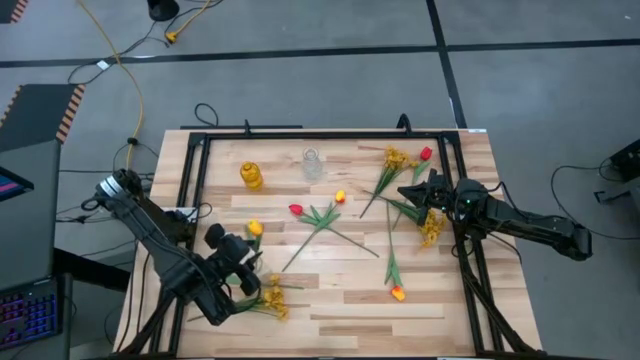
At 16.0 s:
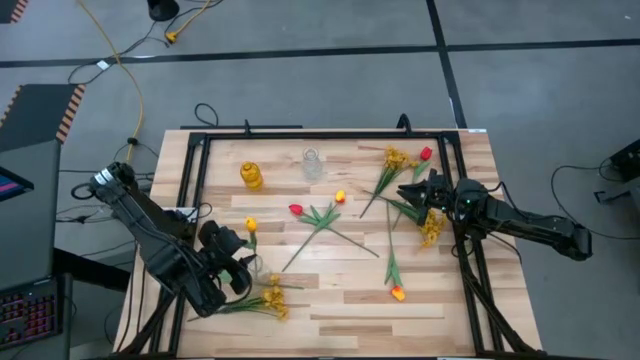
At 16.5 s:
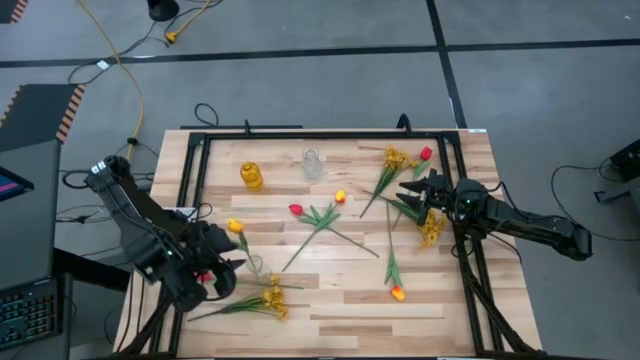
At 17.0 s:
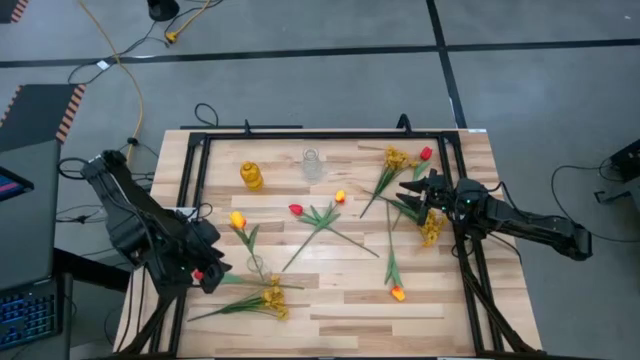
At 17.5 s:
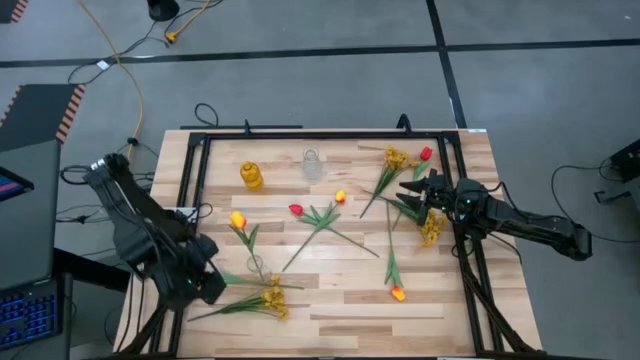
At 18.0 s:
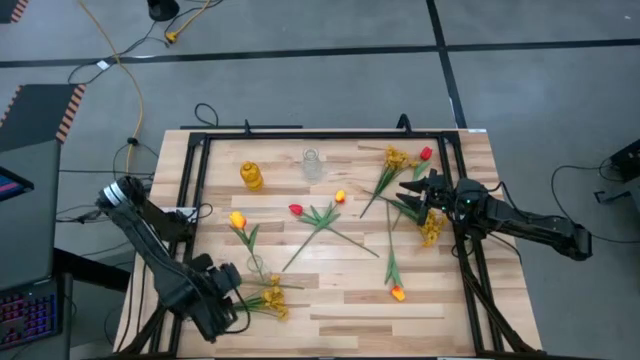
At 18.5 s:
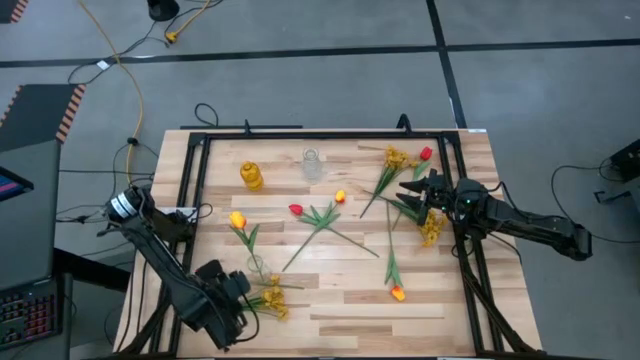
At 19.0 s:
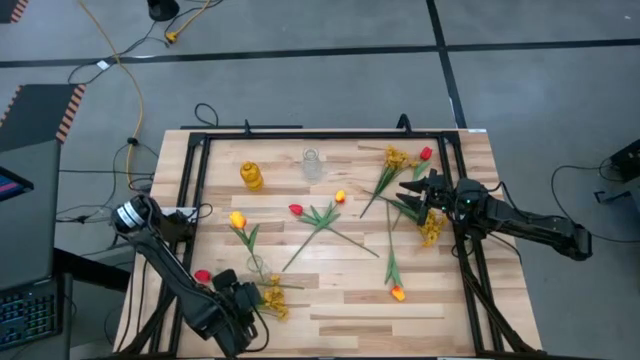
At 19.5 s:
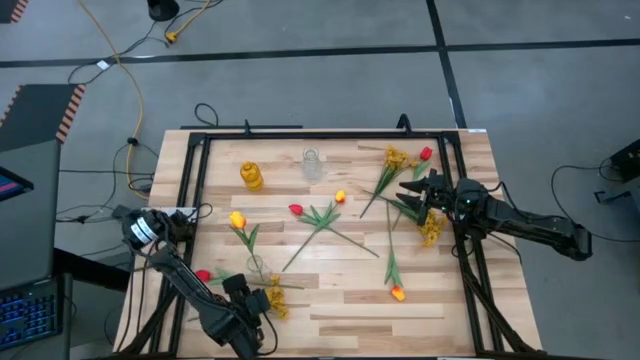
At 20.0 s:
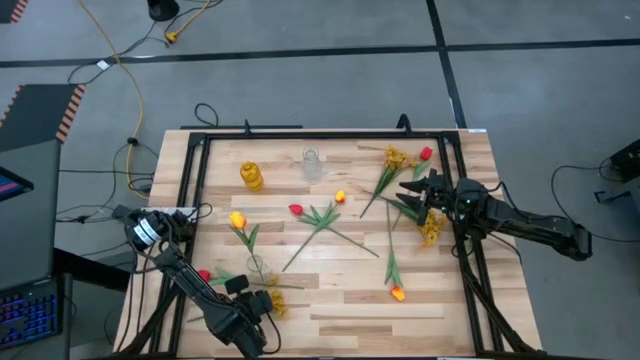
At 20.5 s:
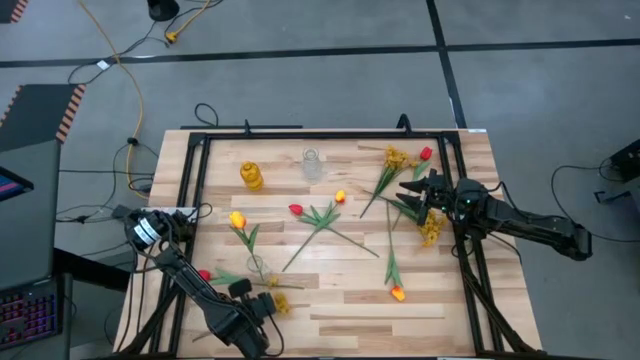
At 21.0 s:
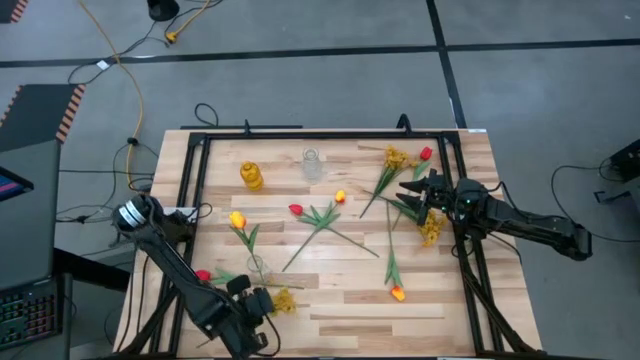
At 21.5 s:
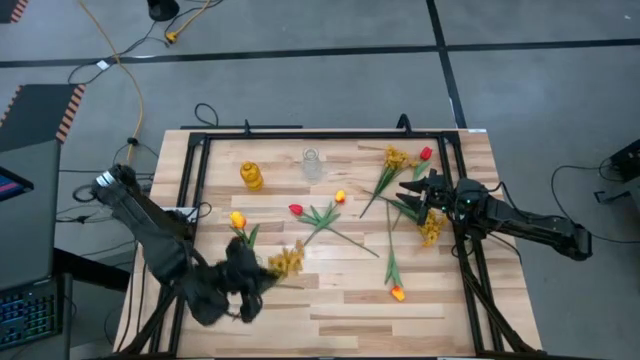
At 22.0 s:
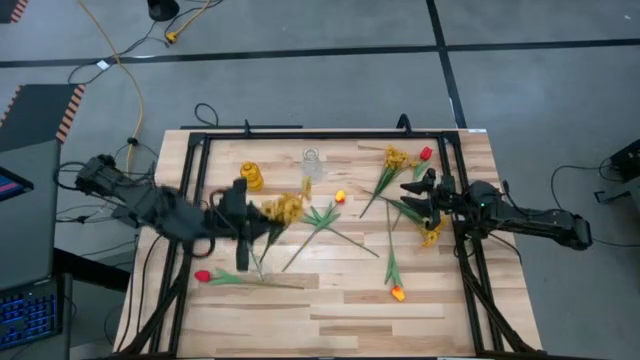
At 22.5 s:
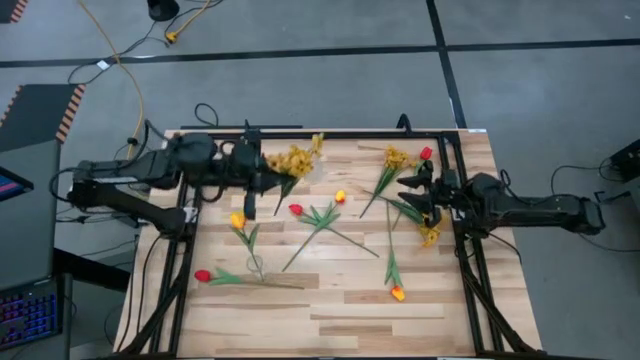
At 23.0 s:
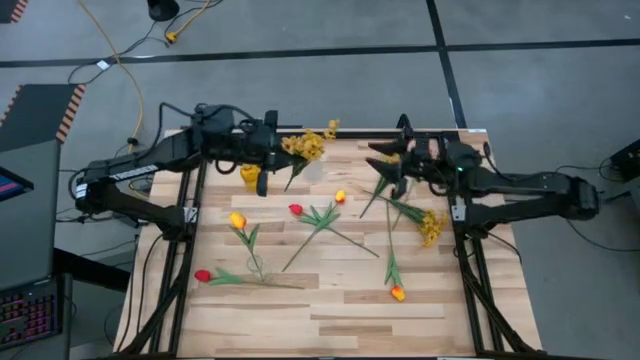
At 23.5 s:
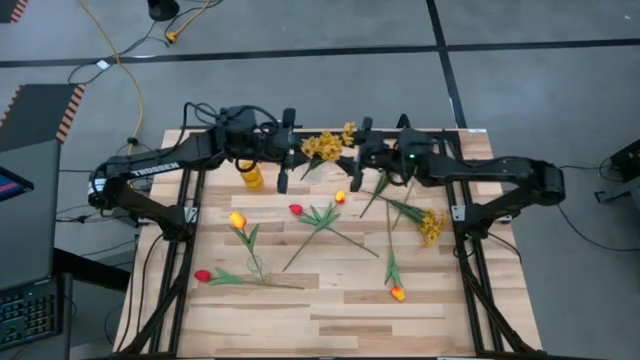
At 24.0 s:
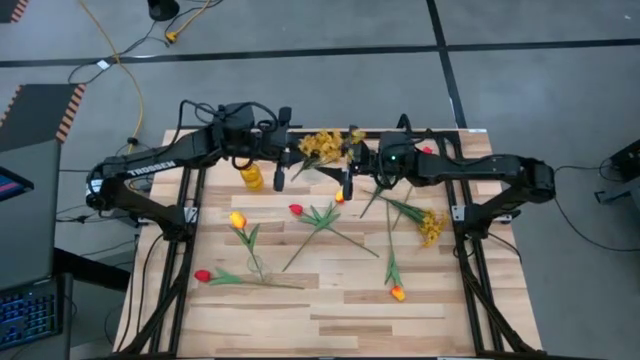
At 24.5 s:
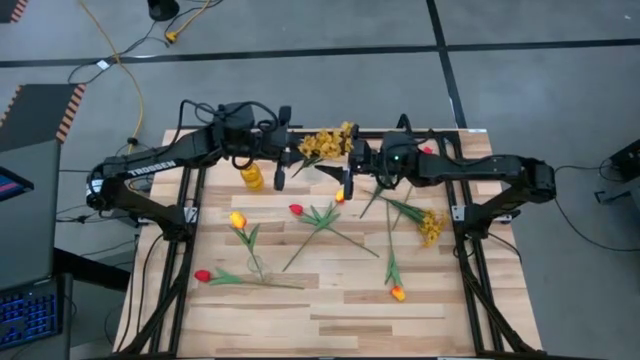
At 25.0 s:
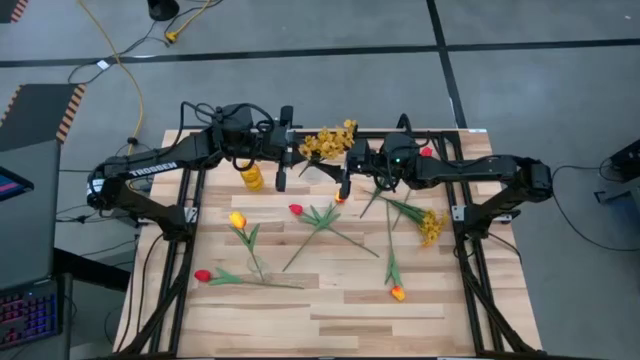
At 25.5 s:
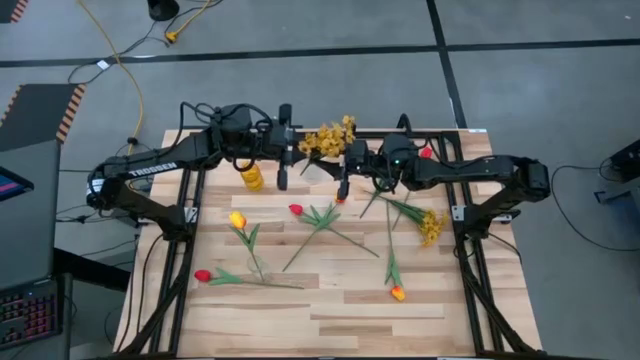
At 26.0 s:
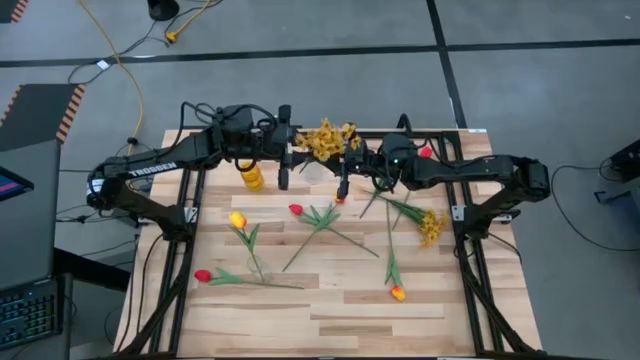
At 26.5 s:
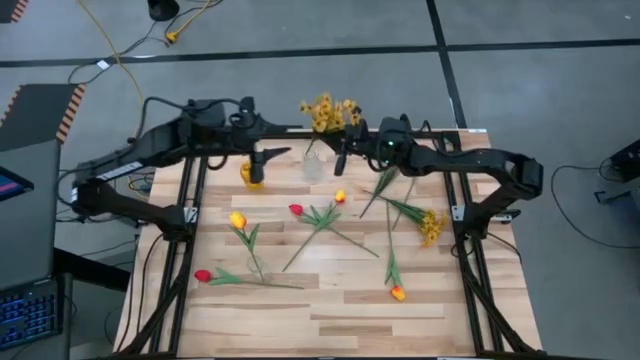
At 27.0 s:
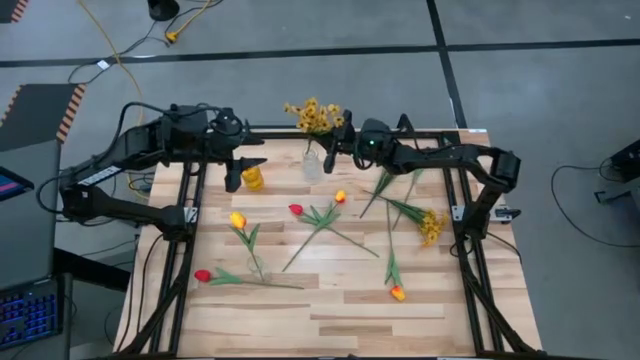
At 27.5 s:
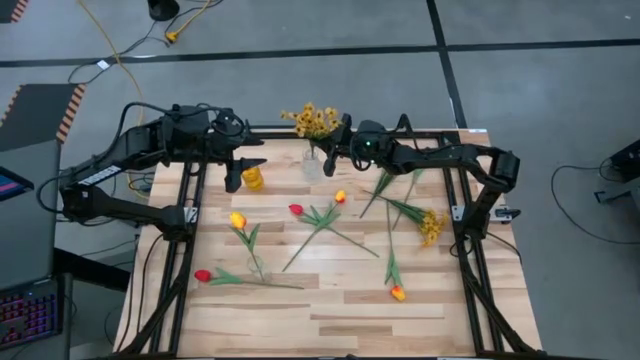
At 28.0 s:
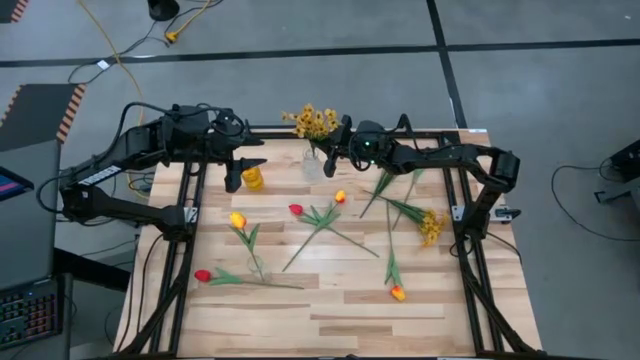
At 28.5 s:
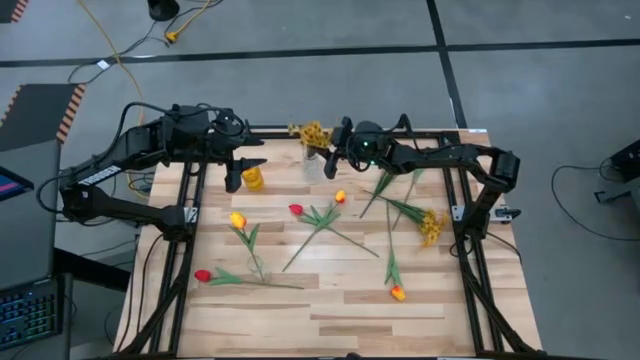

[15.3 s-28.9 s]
Task: Sort flowers into vase by color
Put the bottom yellow flowers into the top transparent vase

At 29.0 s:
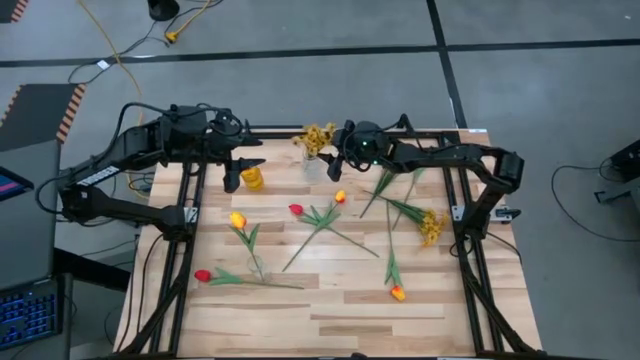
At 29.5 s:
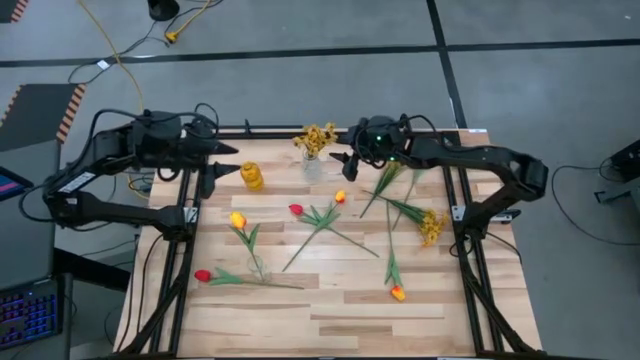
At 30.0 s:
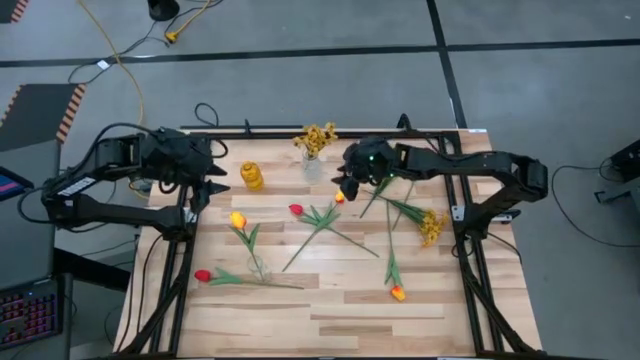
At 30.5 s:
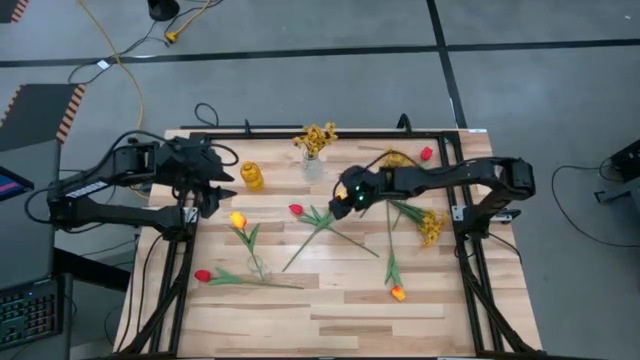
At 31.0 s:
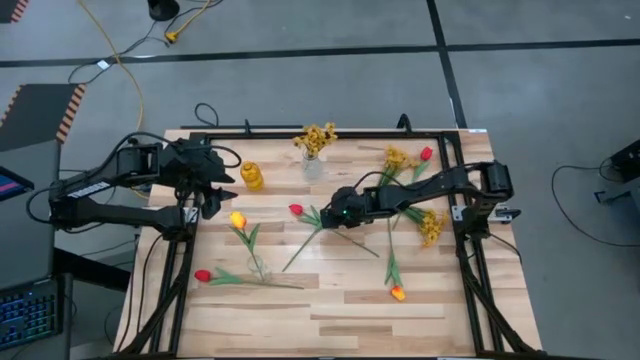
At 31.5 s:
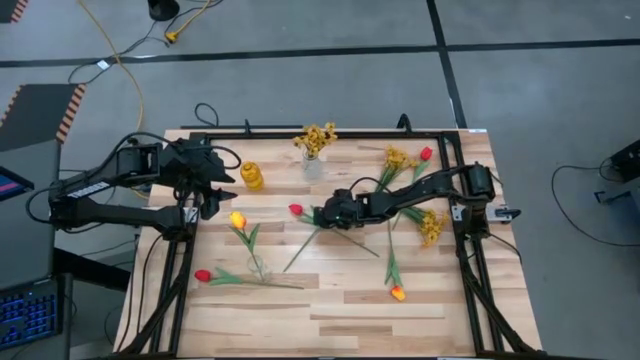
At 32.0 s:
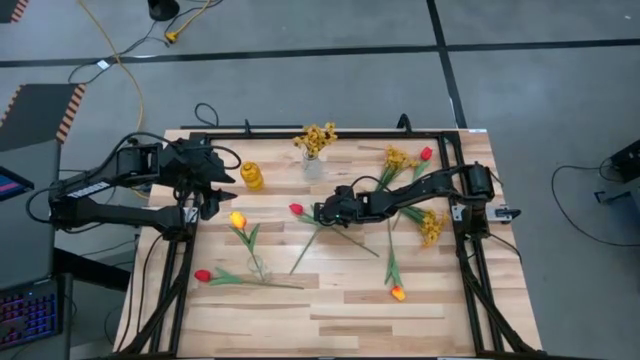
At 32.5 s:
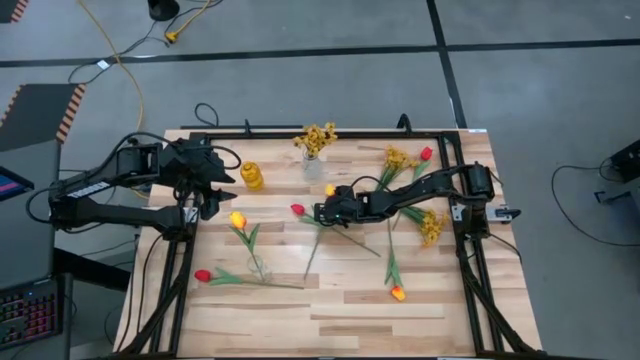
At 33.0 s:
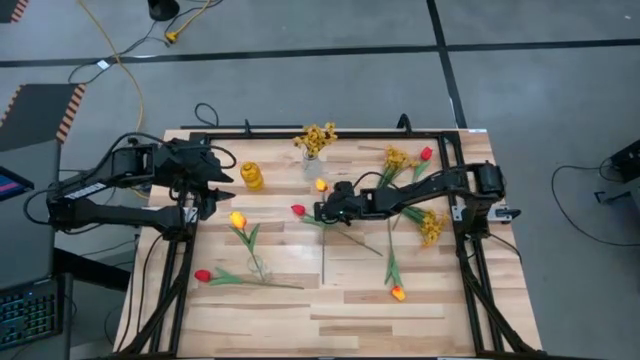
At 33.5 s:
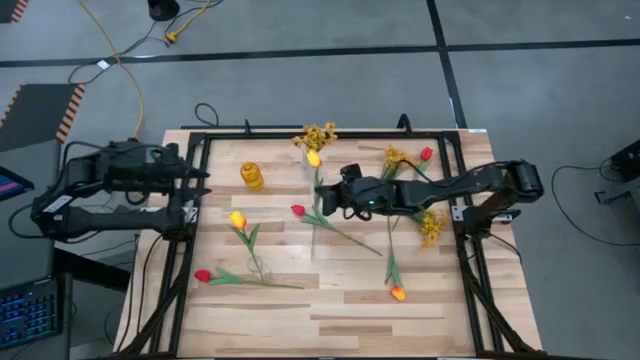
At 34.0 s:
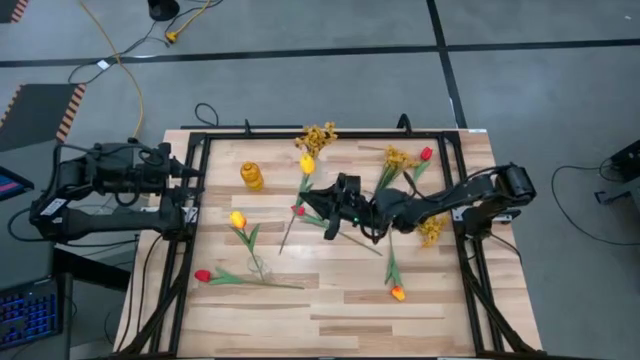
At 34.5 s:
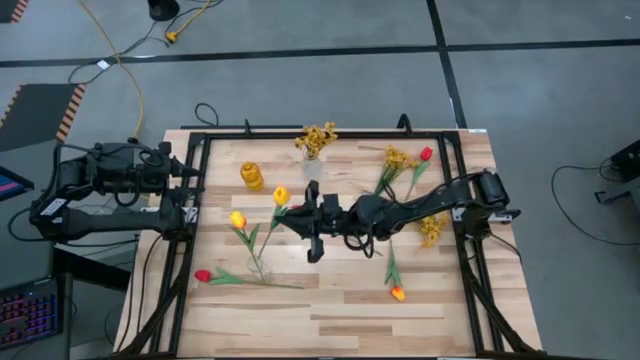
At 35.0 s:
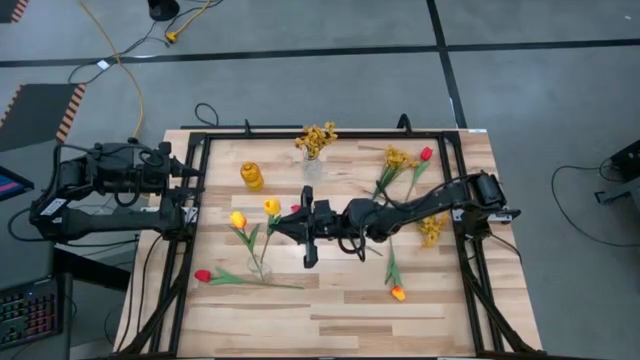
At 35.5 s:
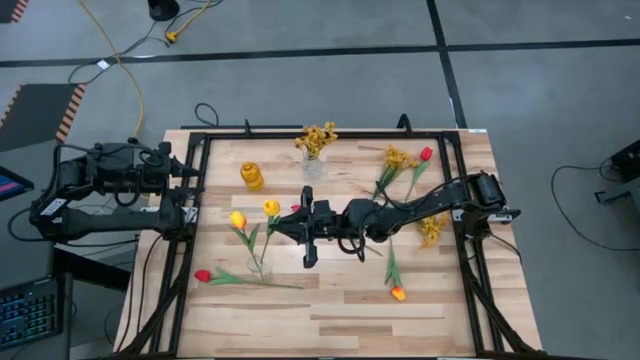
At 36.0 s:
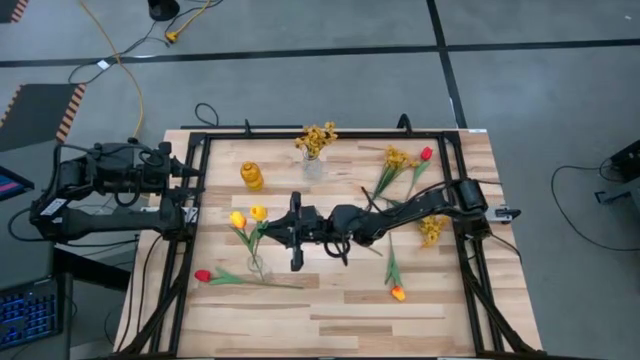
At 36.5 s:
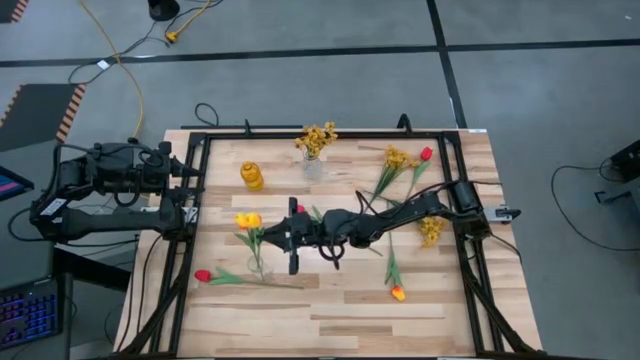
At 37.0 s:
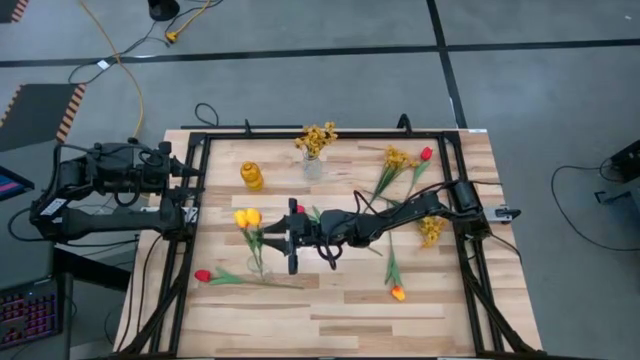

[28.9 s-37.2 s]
Put the left yellow flower into the bottom transparent vase
